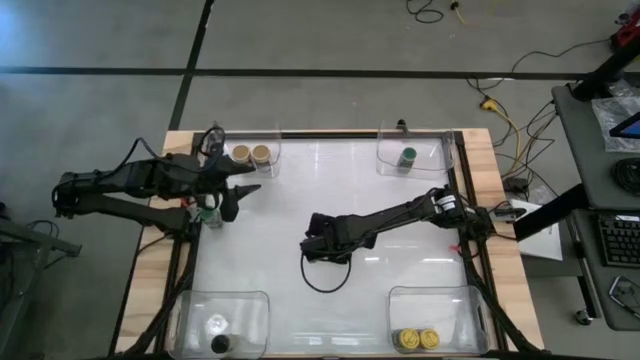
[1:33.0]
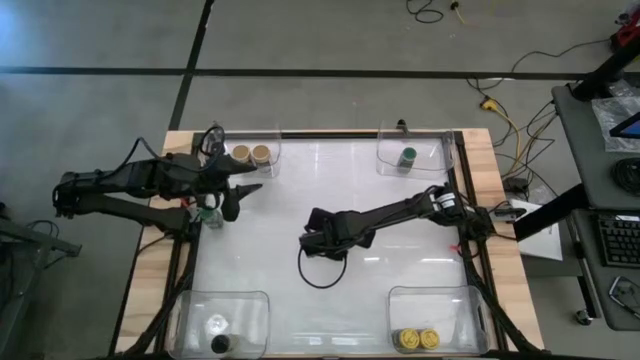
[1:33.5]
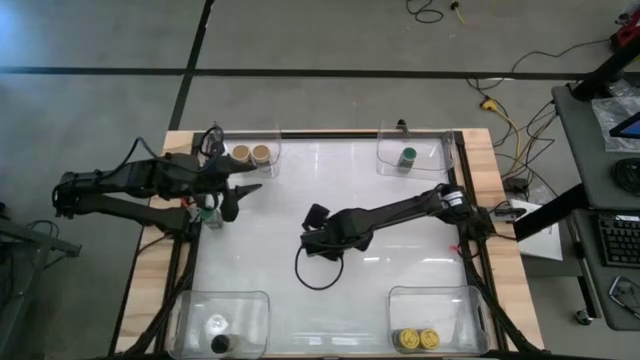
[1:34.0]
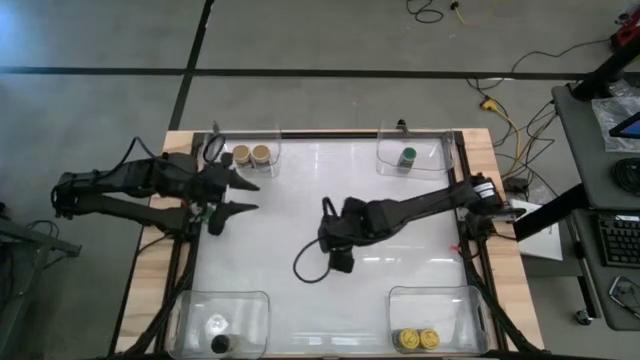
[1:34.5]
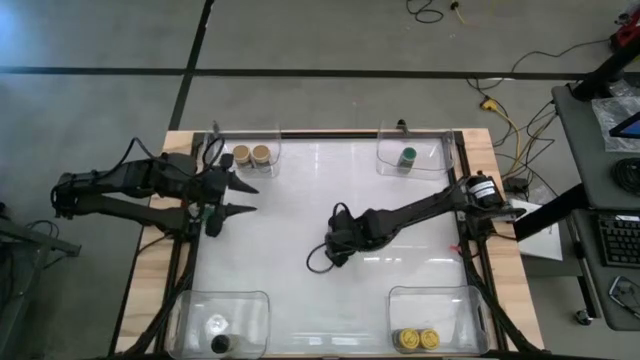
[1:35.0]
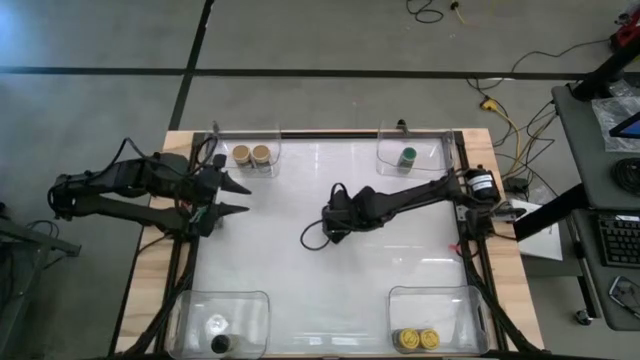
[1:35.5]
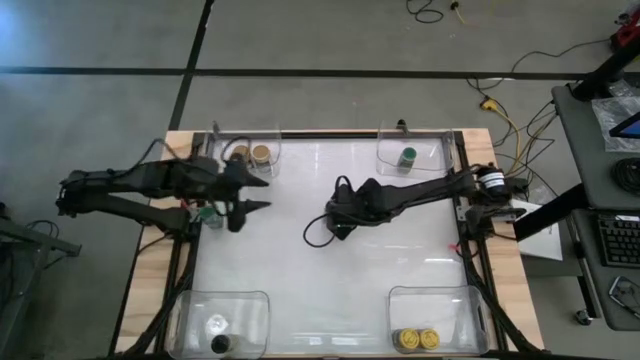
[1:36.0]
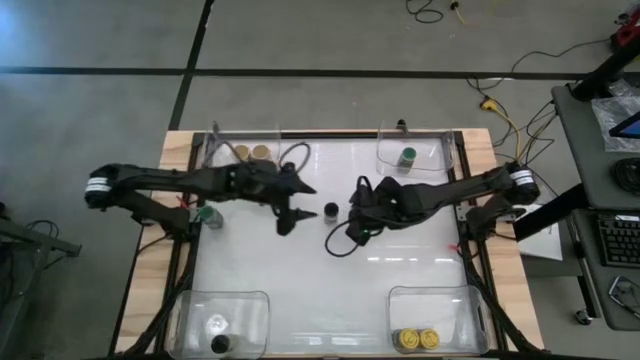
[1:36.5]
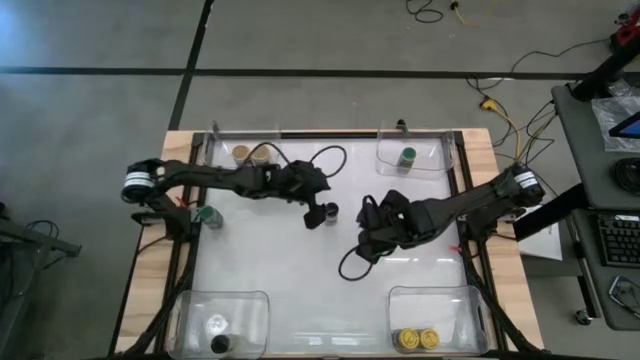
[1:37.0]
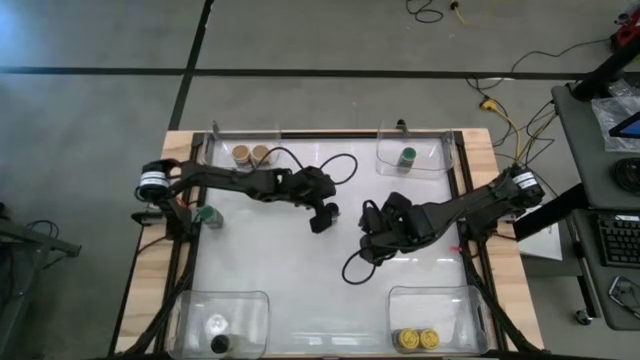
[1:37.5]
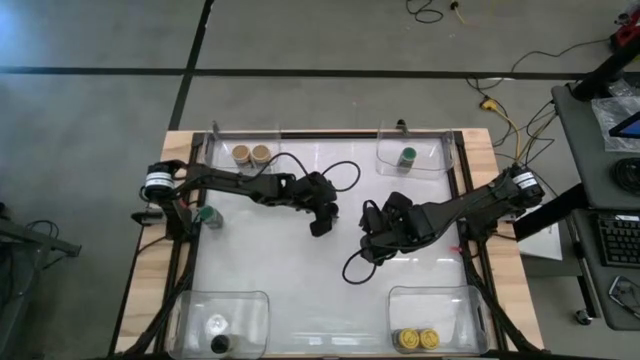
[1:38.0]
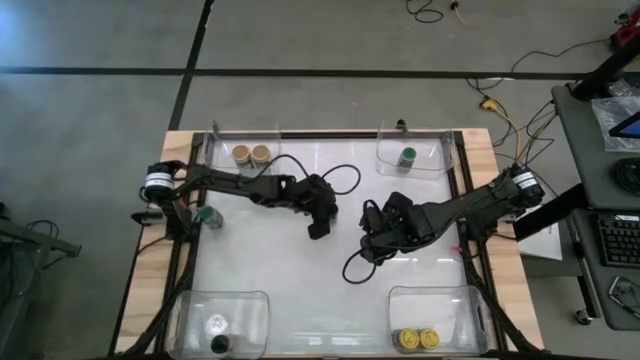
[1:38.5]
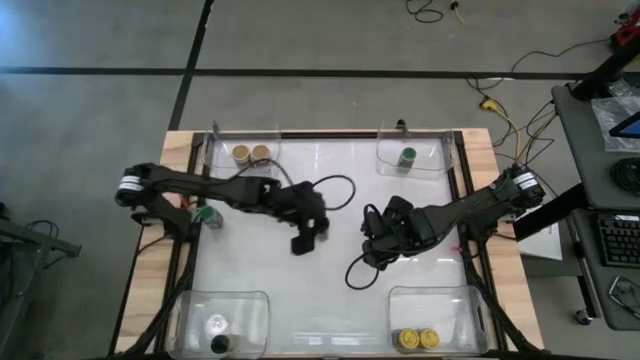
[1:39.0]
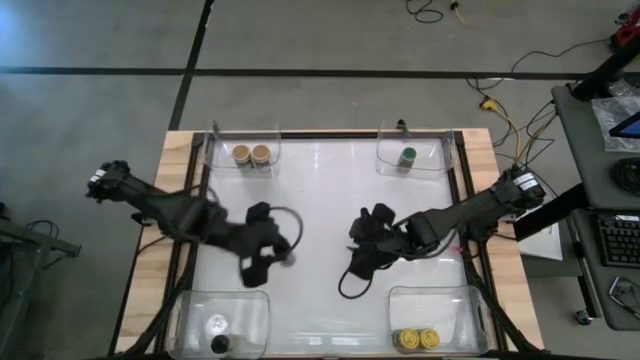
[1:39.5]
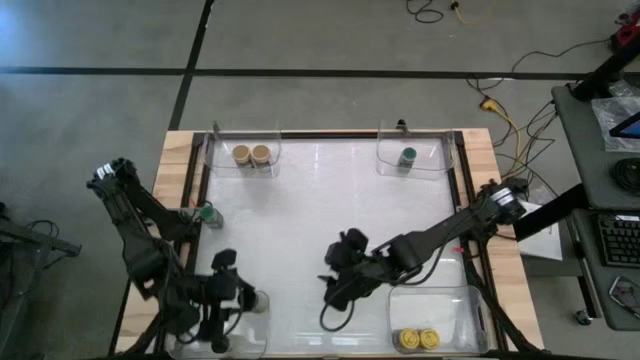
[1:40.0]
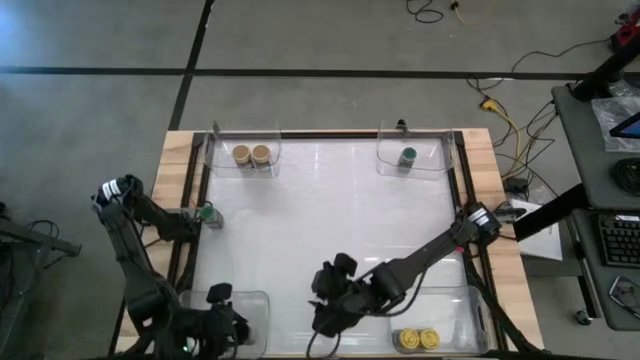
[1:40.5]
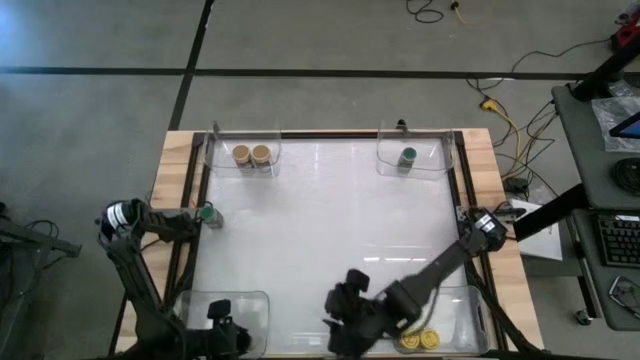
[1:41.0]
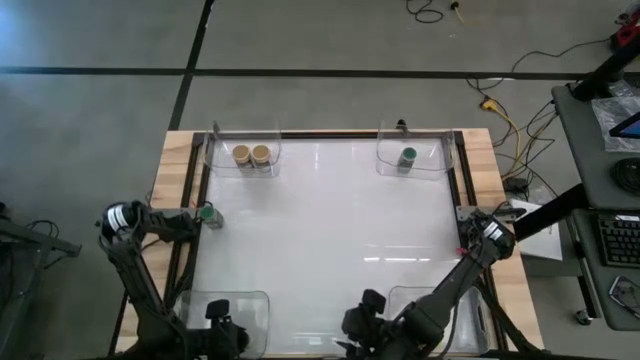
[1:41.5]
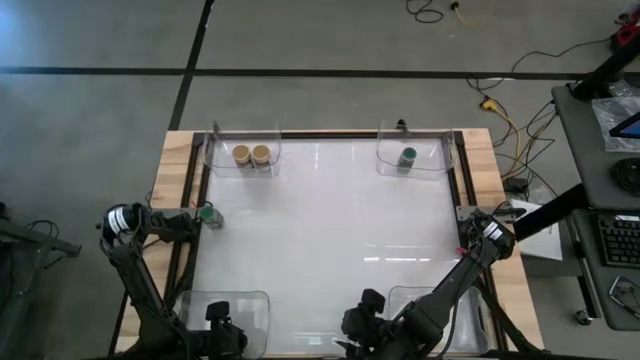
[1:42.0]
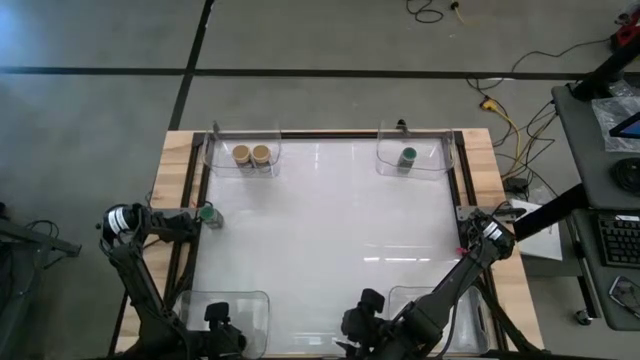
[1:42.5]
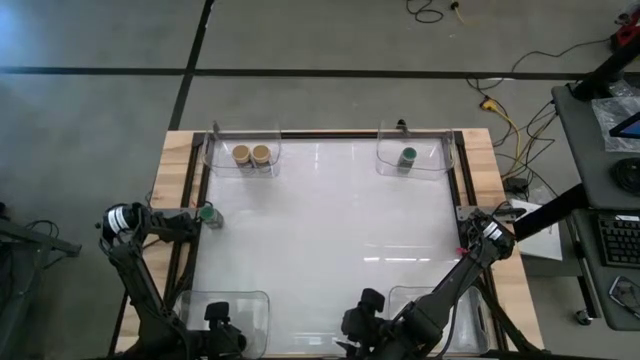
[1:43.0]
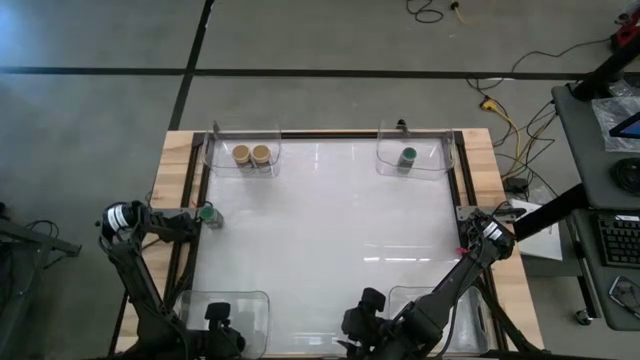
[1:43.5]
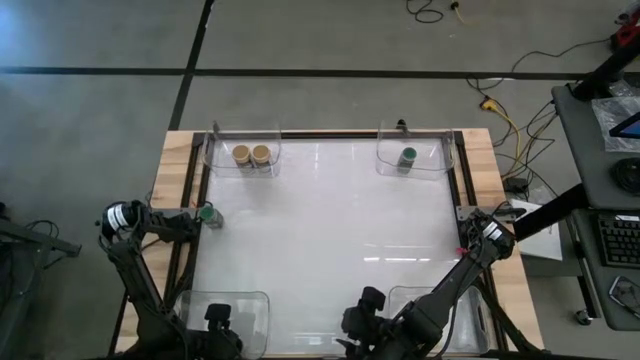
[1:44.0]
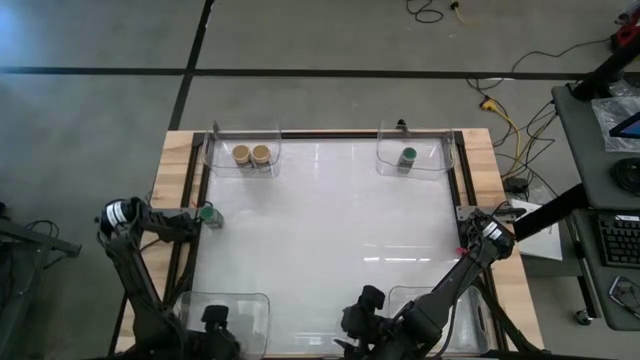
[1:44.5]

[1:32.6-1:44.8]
Task: Sort spices by type
Put the black seasoning bottle into the bottom left transparent bin

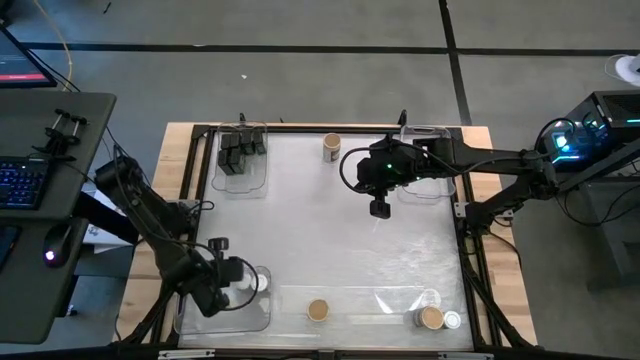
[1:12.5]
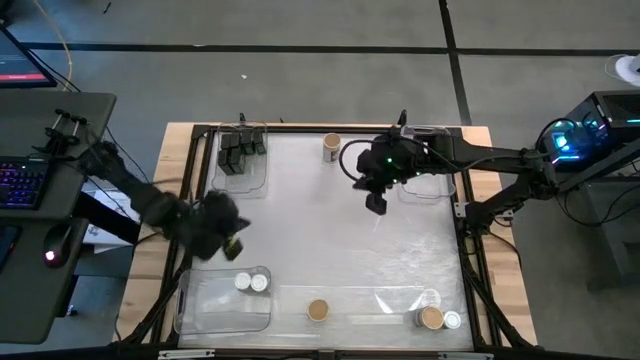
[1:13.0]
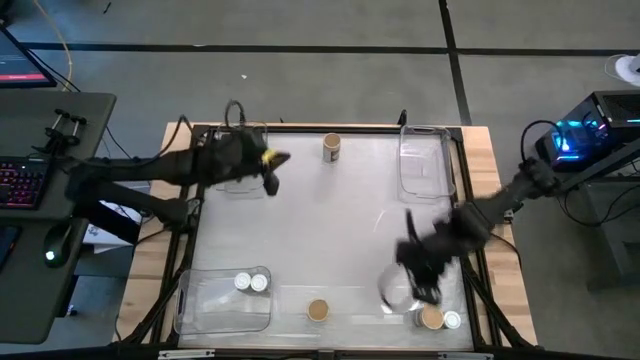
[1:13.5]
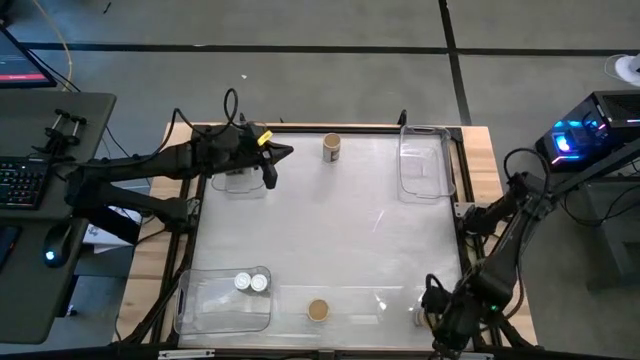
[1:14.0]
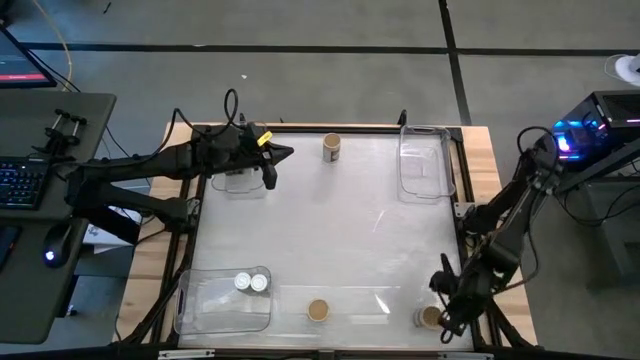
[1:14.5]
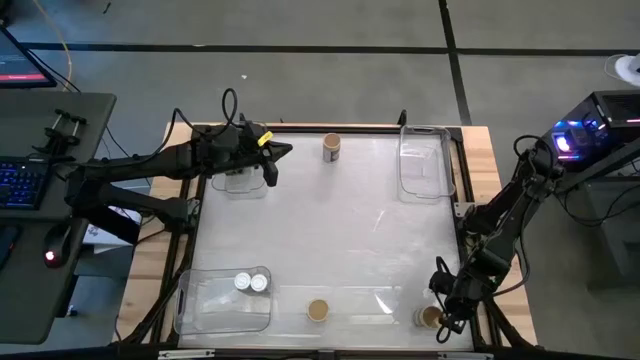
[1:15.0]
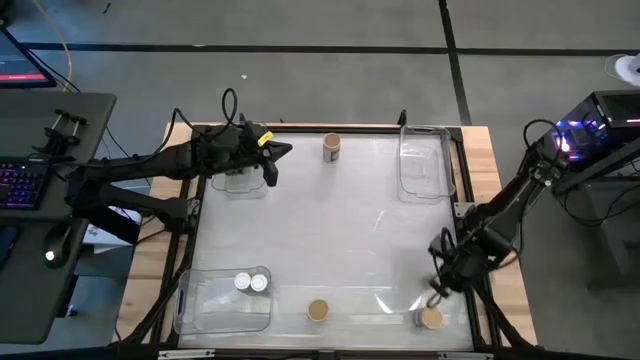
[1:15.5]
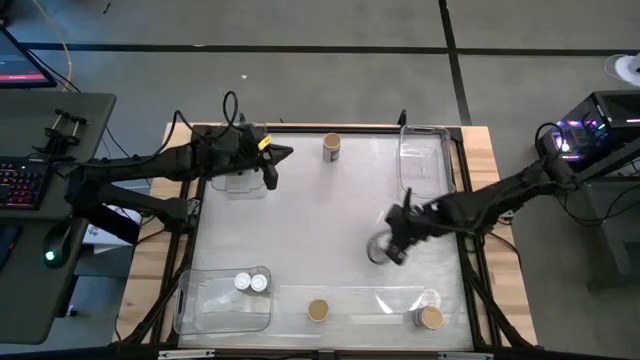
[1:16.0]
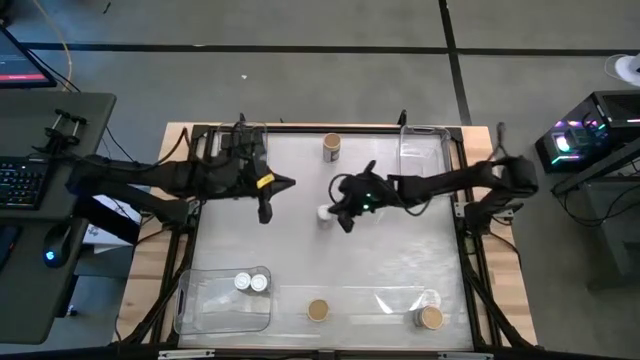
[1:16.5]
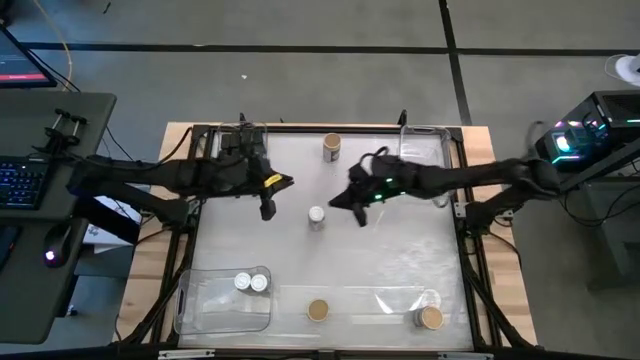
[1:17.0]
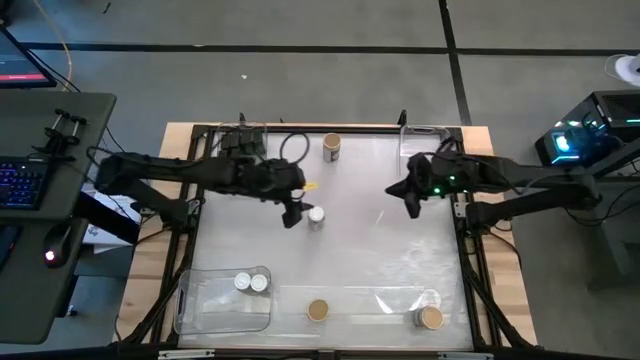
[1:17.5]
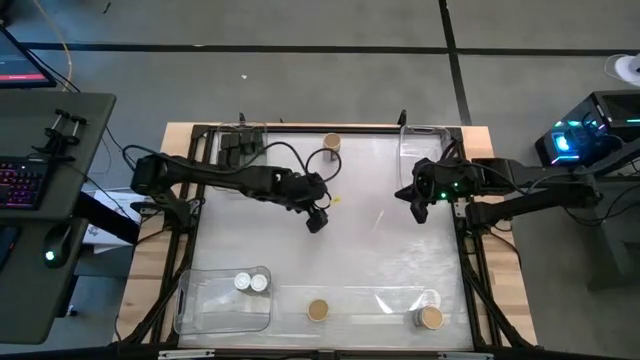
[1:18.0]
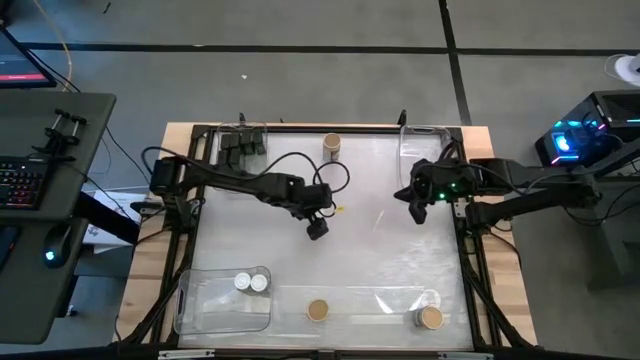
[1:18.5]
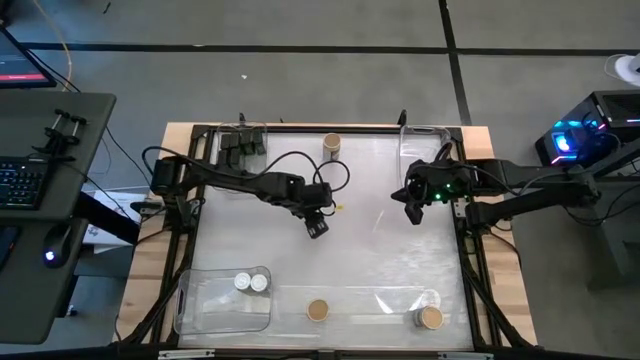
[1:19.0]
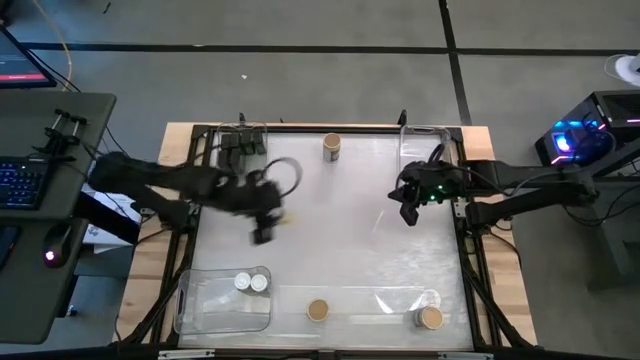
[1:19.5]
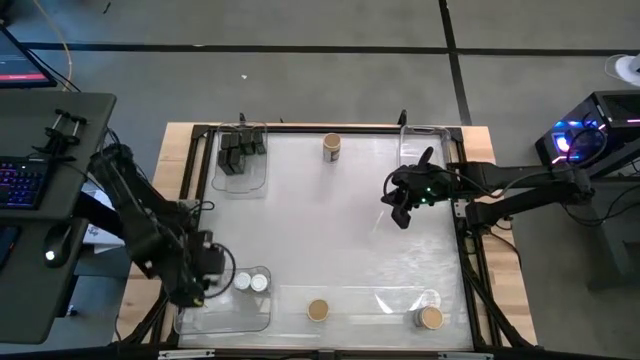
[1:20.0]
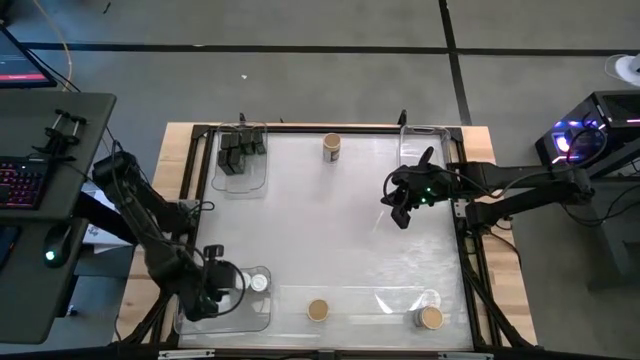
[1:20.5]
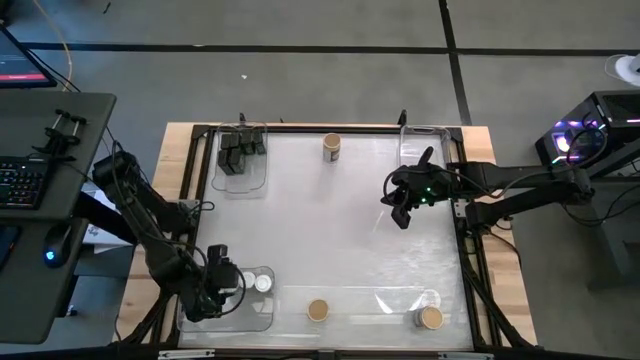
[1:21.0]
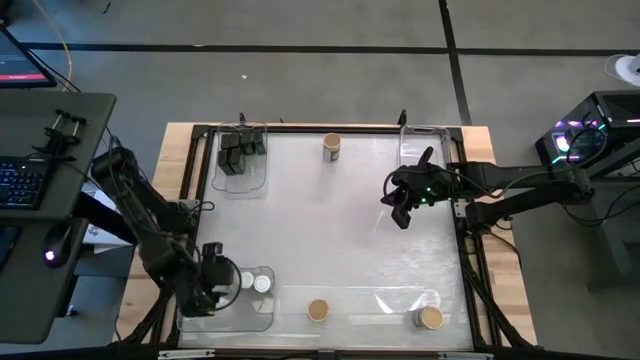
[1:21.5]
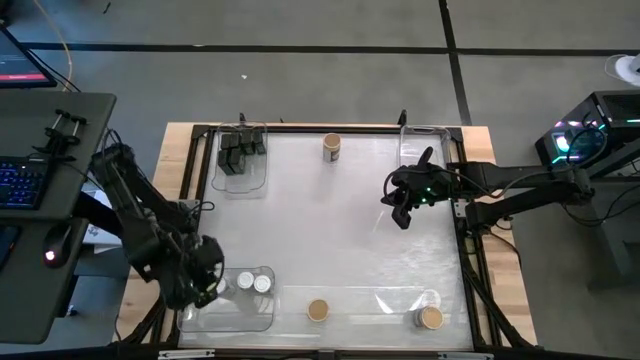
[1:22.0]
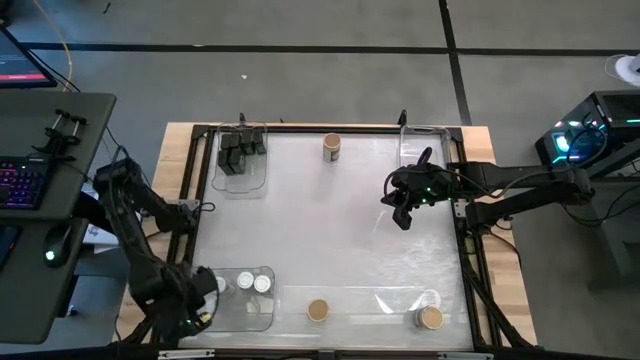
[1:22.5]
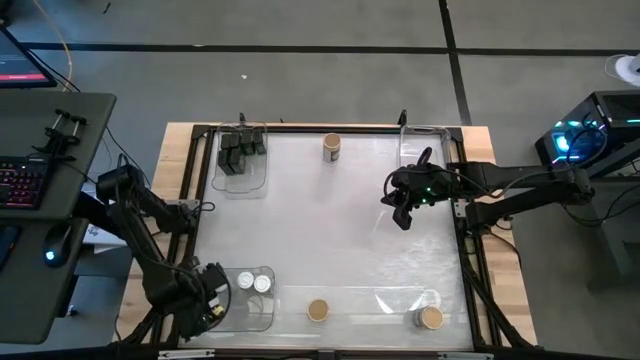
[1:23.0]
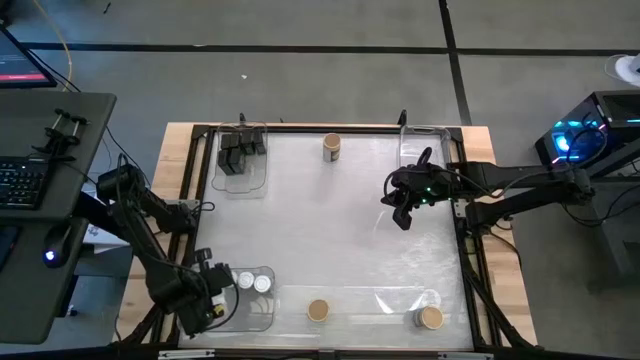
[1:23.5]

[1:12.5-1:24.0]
Task: Sort spices by type
Put the white seasoning bottle into the bottom transparent bin
